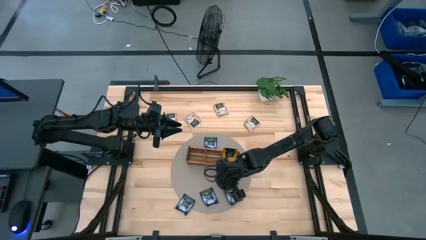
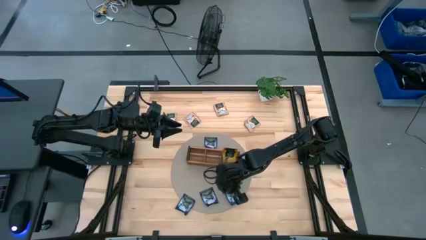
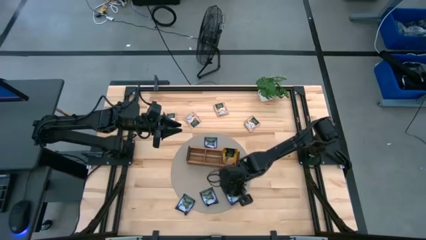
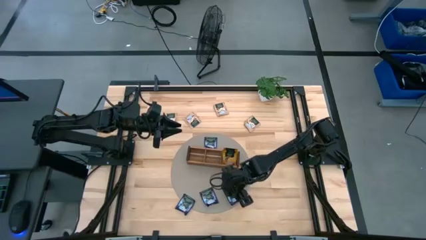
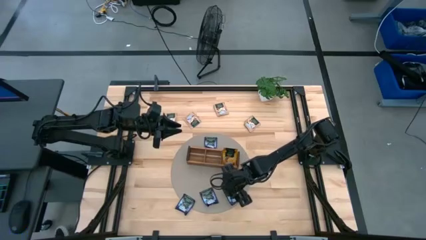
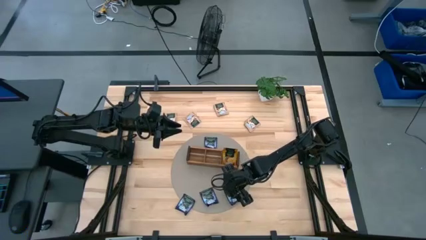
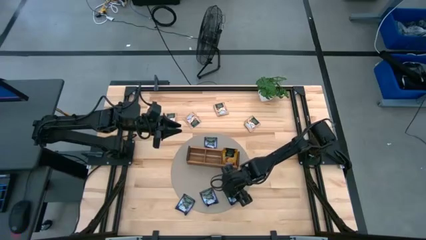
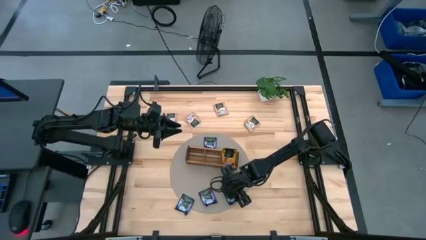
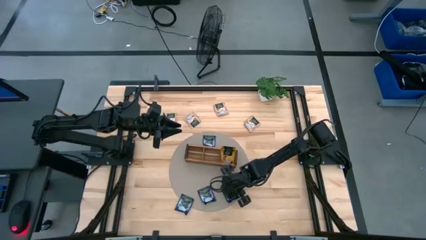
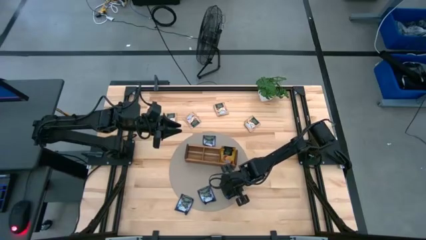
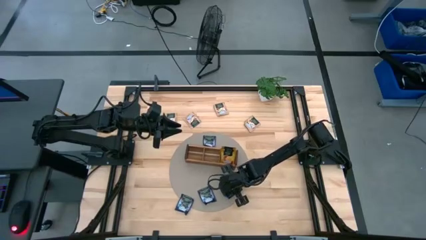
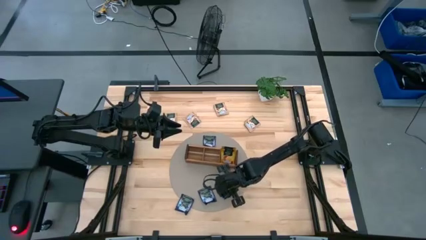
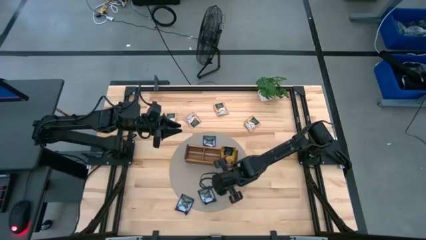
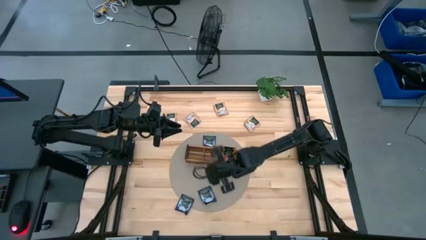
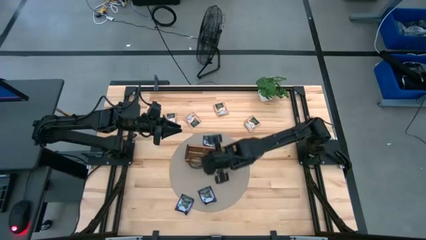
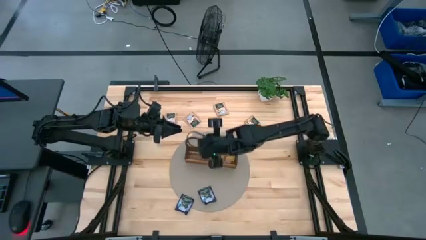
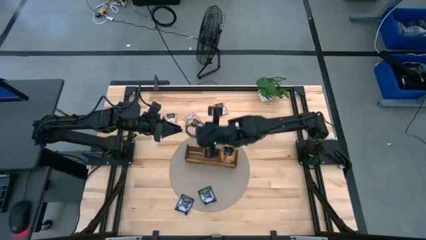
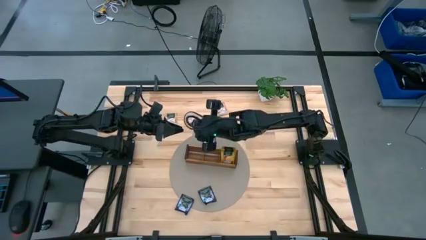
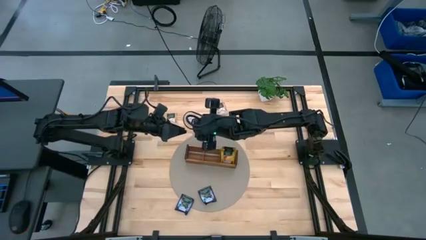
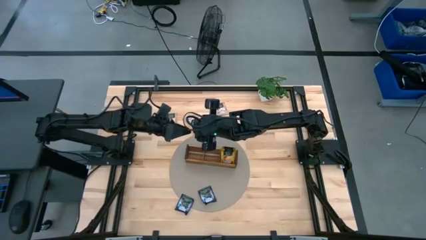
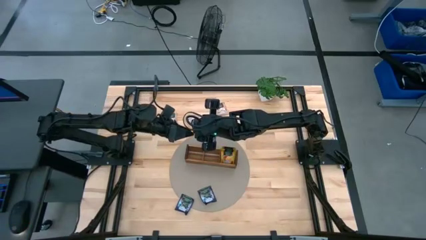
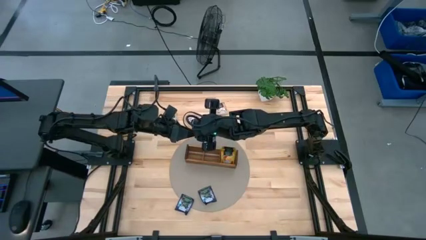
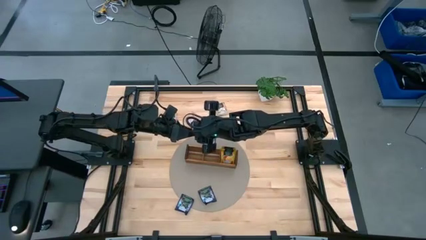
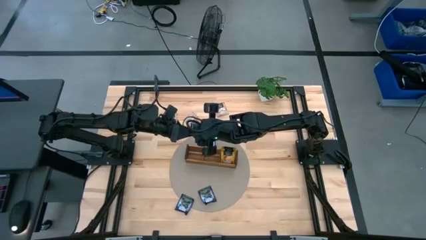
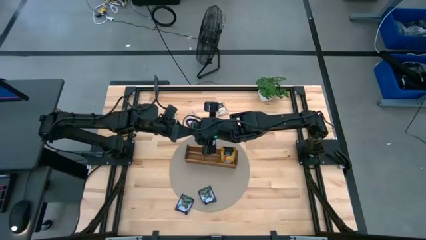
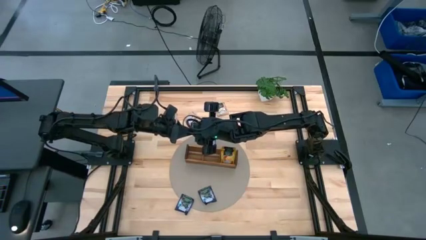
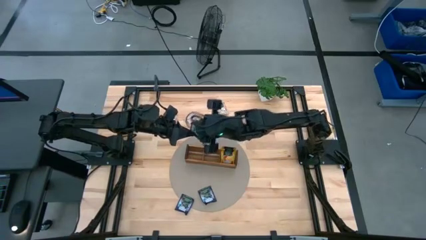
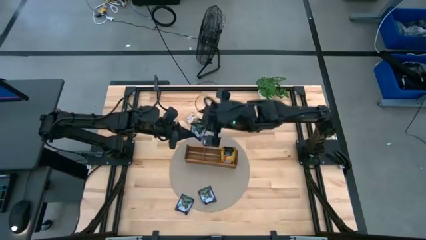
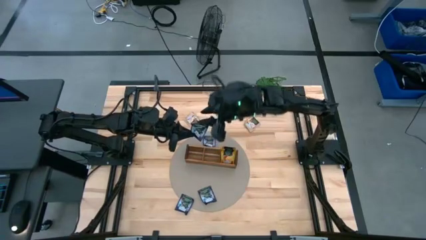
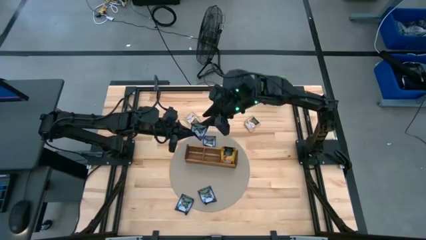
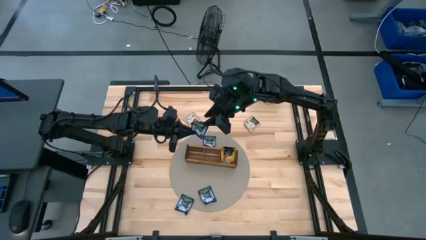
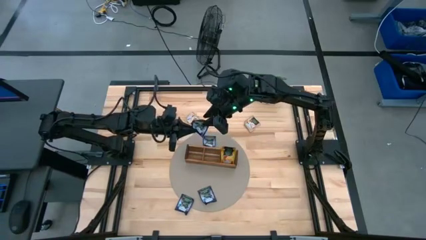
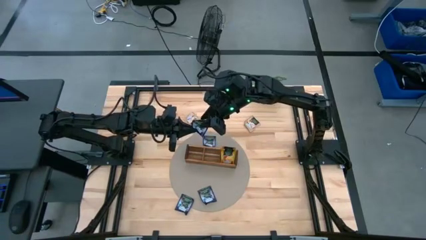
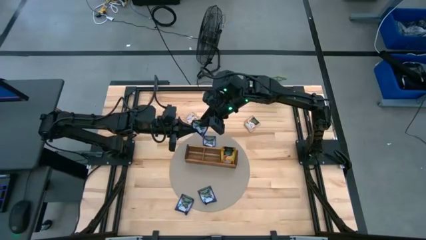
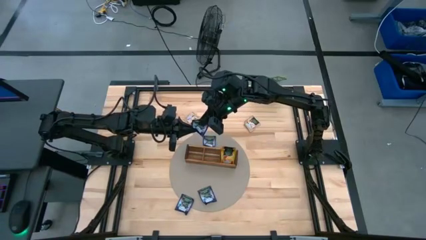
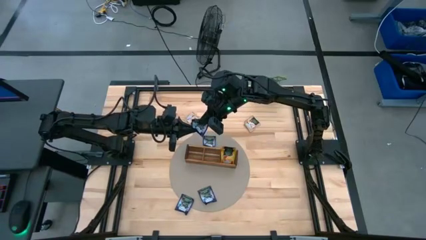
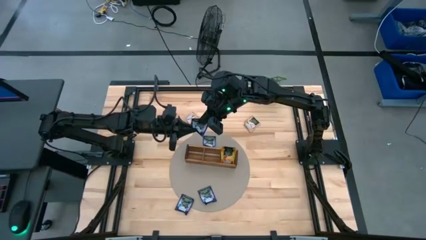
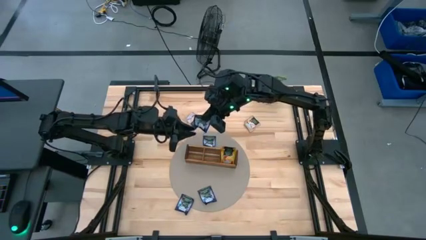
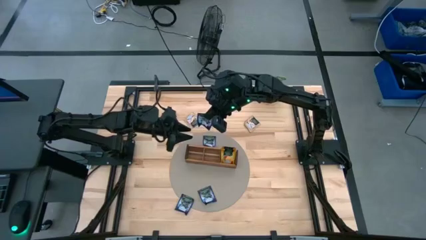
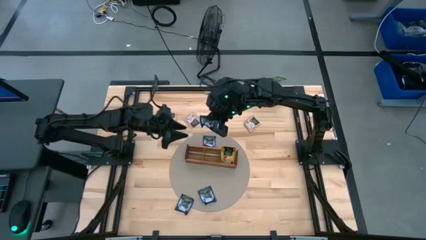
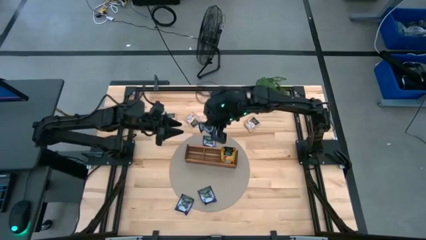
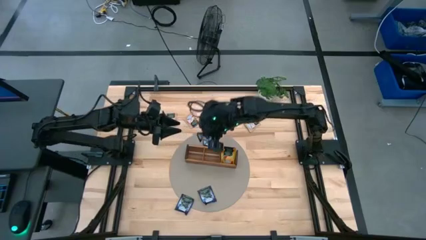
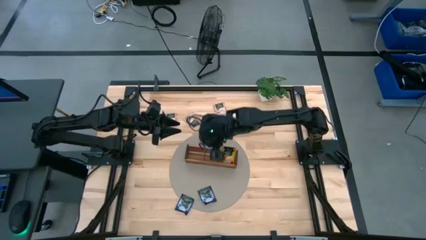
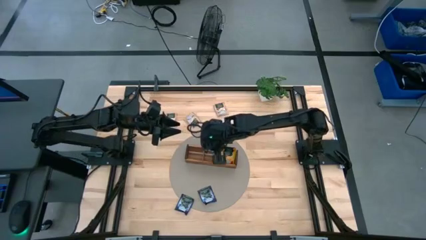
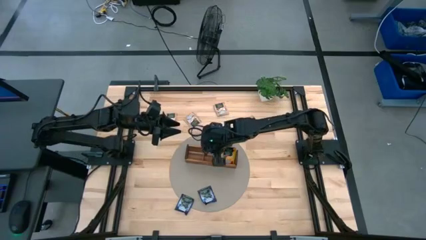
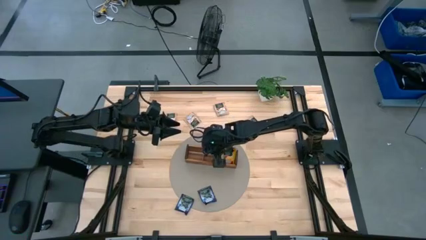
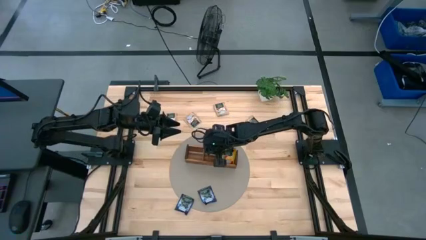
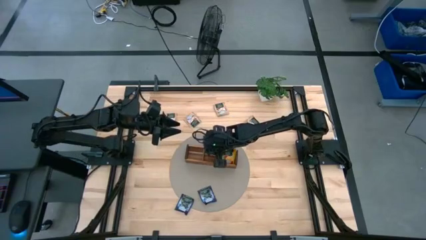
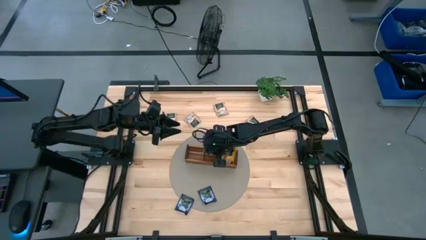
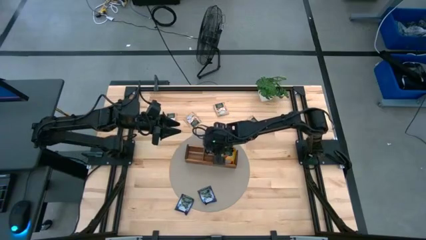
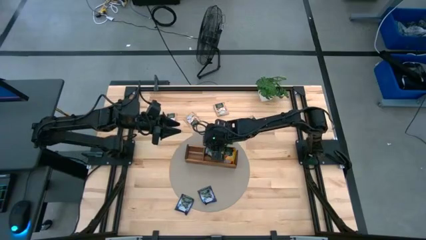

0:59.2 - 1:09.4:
Task: Pick & Place Tea
Put the purple tea bag into the middle section of the wooden organizer

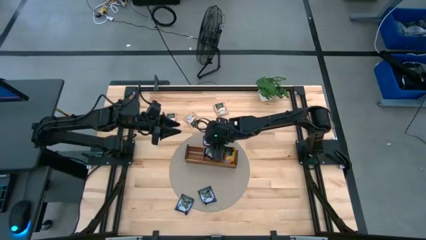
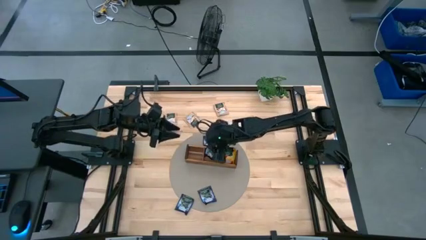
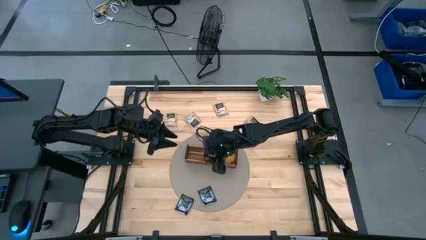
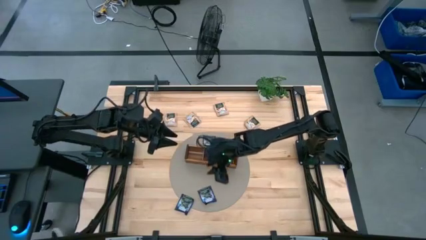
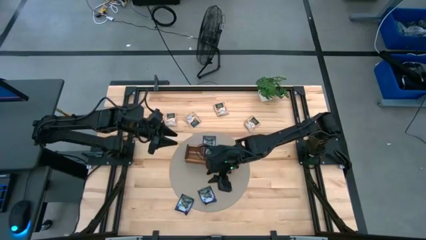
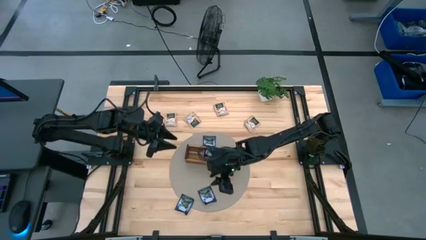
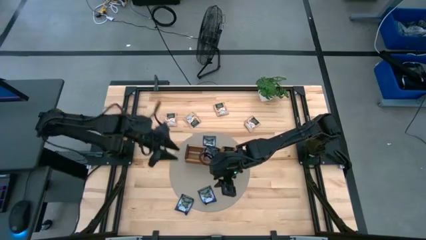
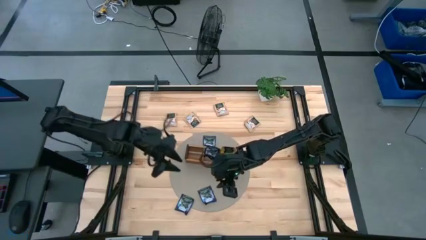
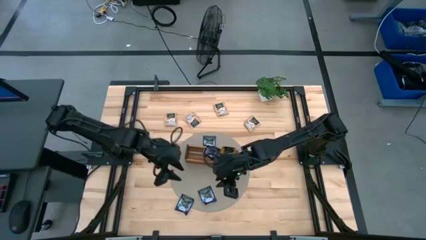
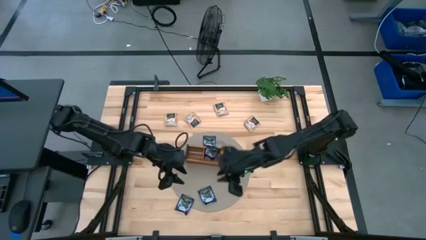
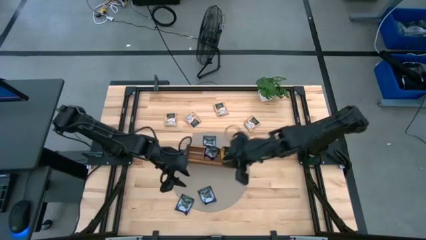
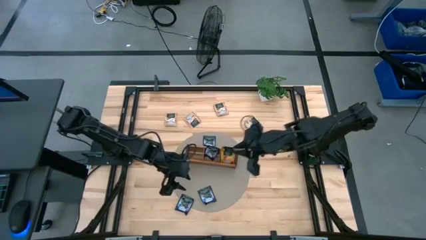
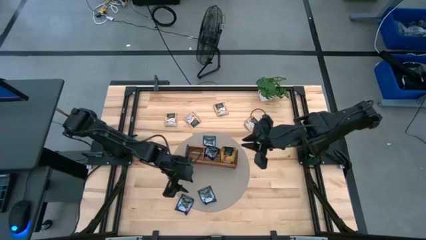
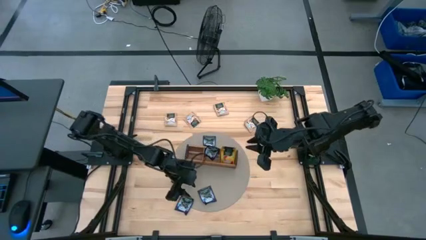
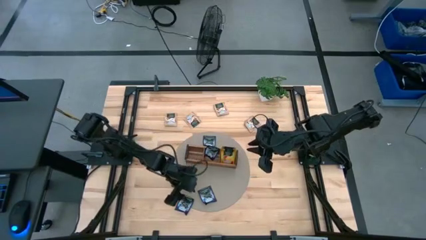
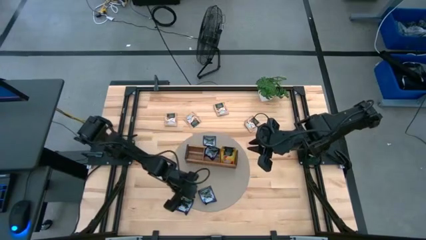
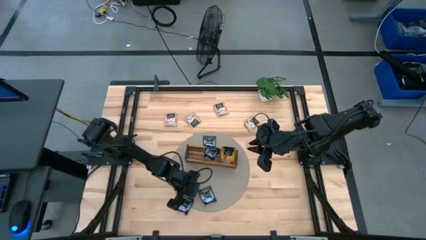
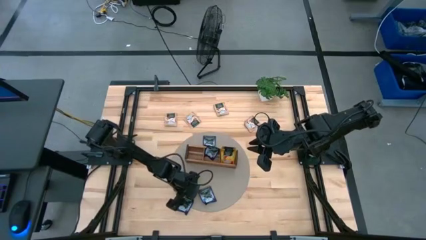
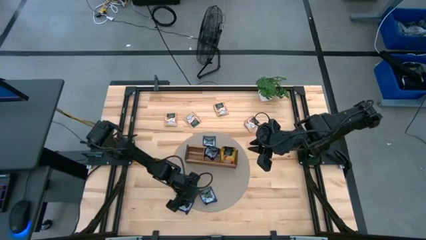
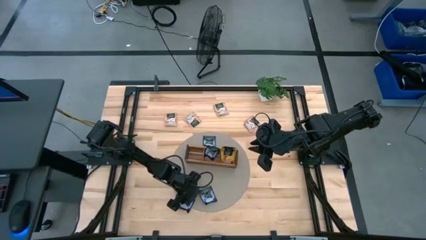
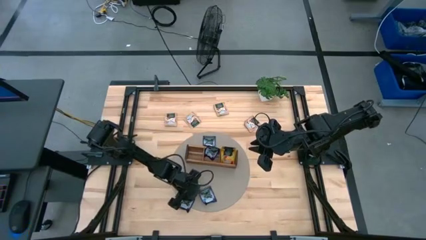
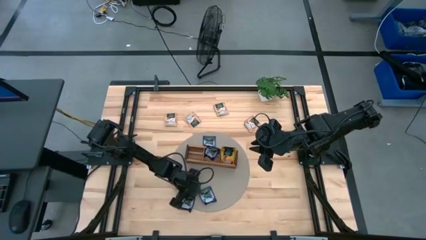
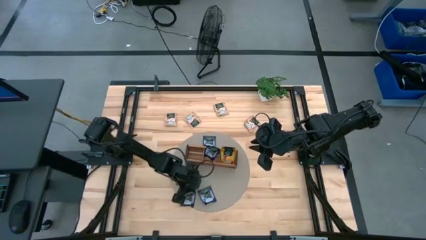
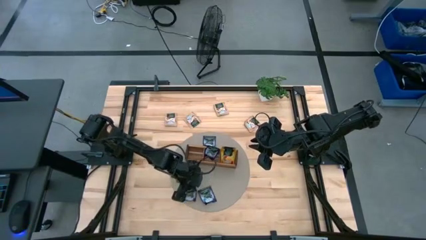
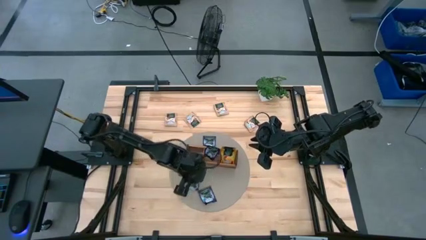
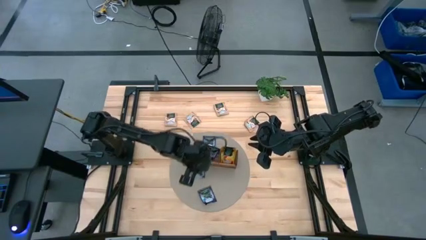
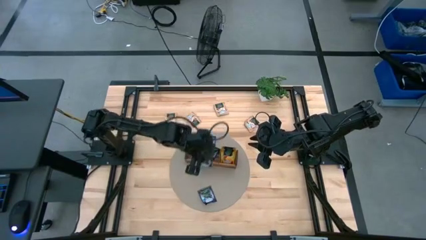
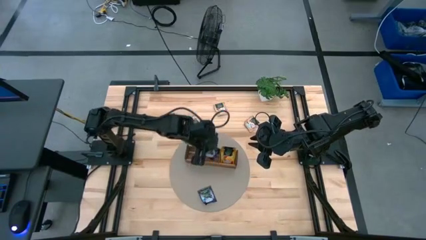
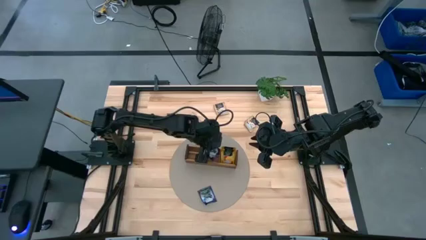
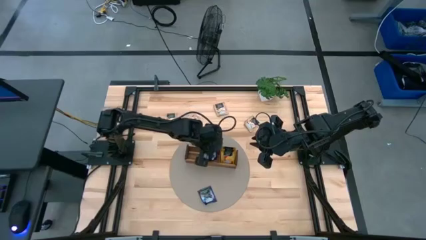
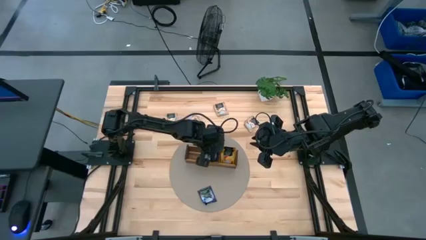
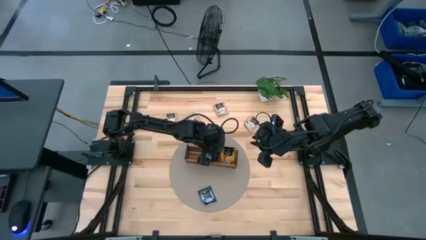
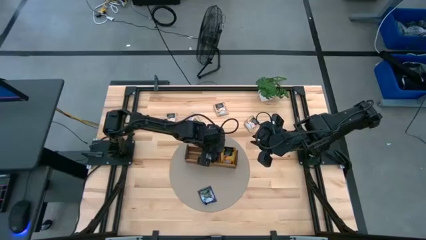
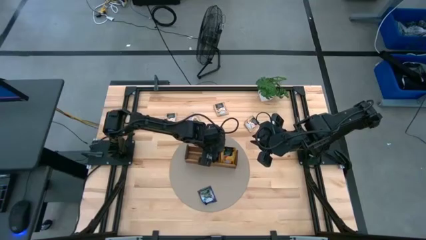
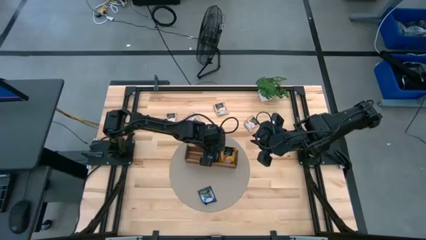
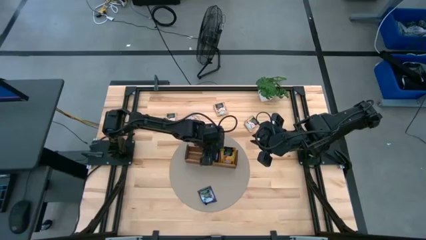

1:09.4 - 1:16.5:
Put the purple tea bag into the middle section of the wooden organizer
